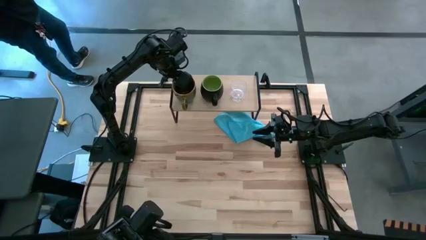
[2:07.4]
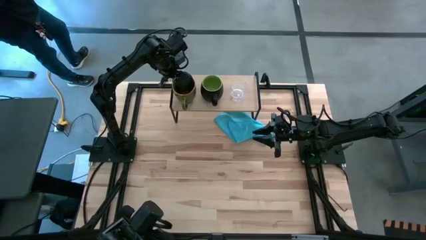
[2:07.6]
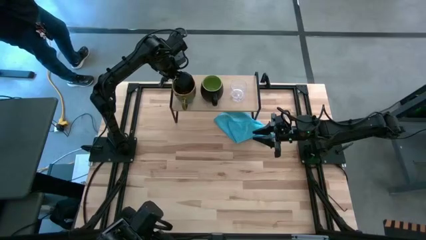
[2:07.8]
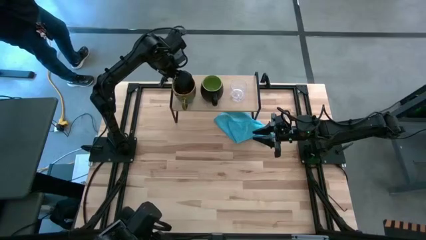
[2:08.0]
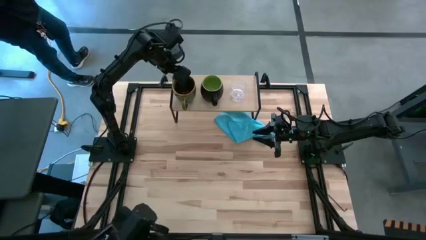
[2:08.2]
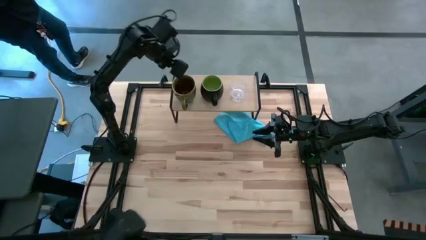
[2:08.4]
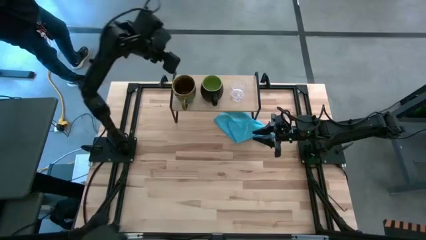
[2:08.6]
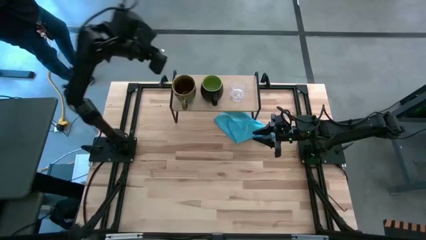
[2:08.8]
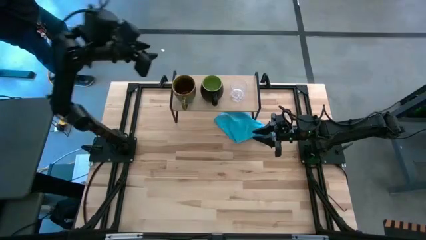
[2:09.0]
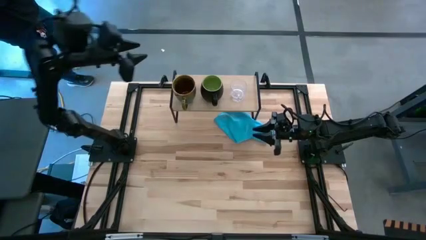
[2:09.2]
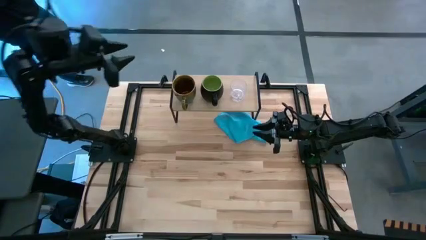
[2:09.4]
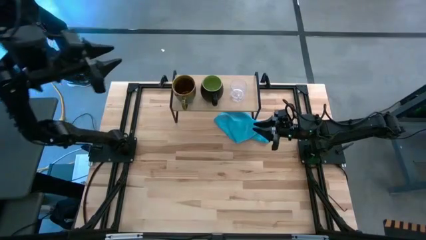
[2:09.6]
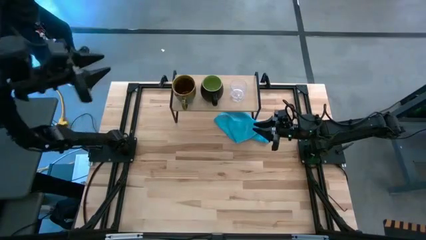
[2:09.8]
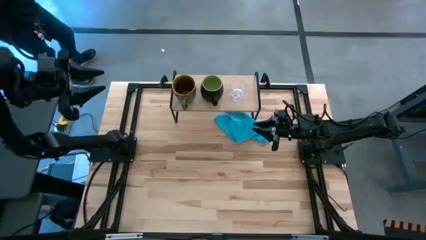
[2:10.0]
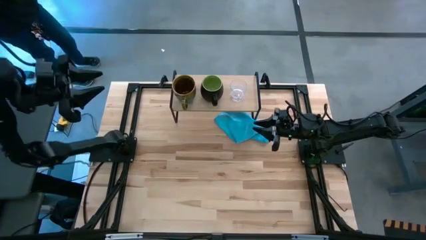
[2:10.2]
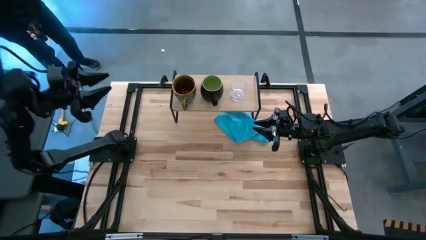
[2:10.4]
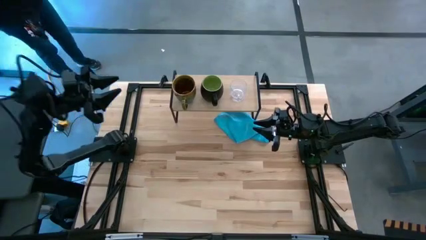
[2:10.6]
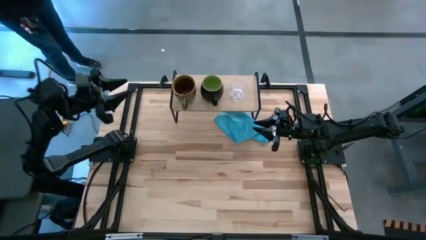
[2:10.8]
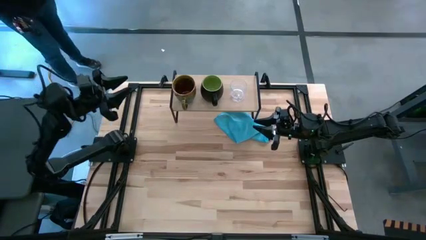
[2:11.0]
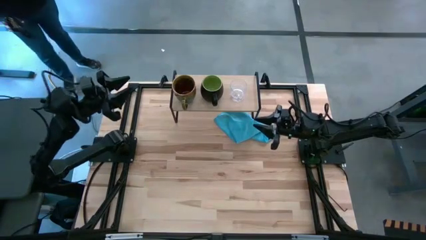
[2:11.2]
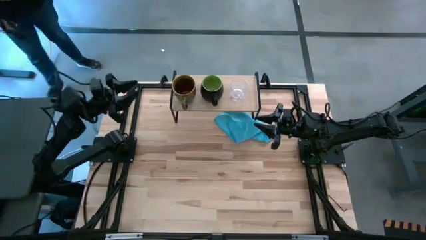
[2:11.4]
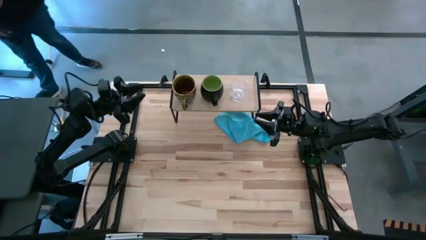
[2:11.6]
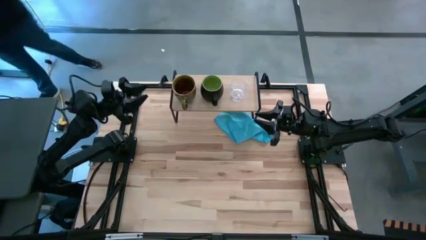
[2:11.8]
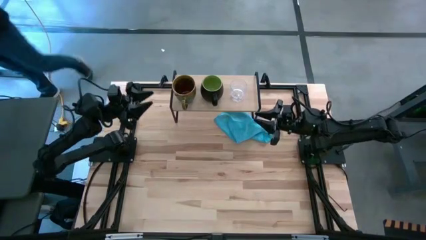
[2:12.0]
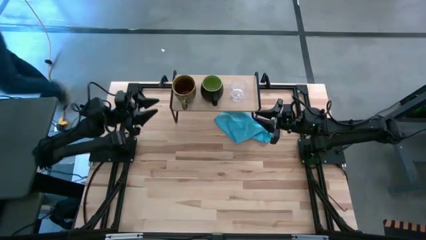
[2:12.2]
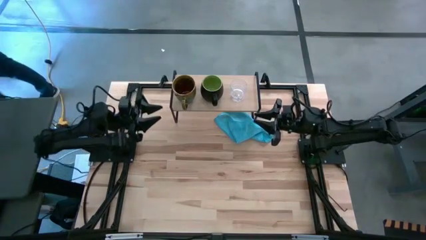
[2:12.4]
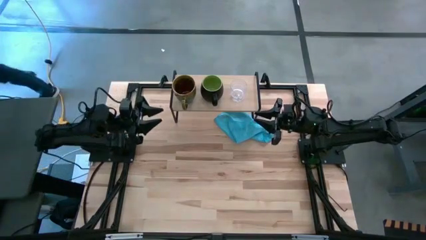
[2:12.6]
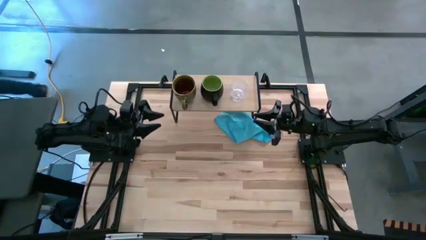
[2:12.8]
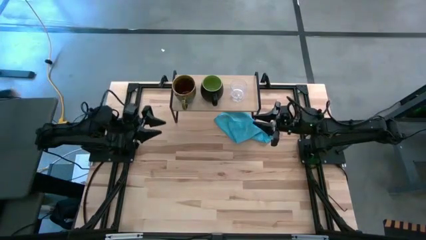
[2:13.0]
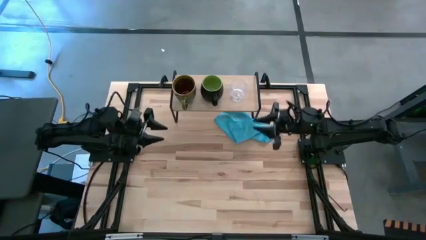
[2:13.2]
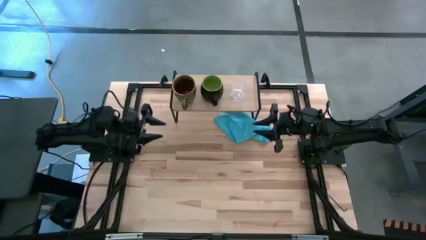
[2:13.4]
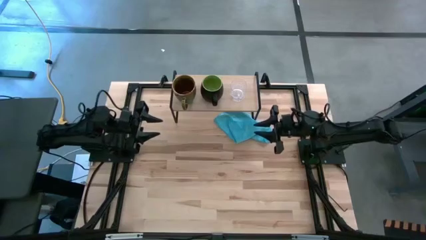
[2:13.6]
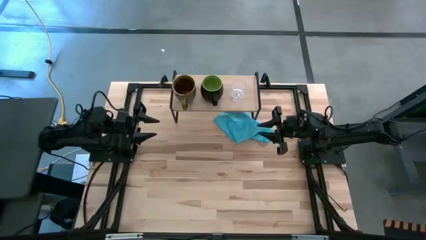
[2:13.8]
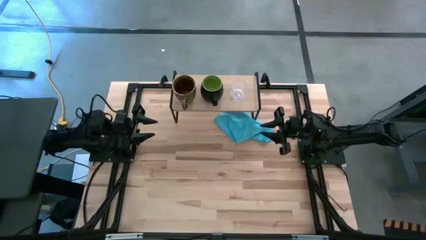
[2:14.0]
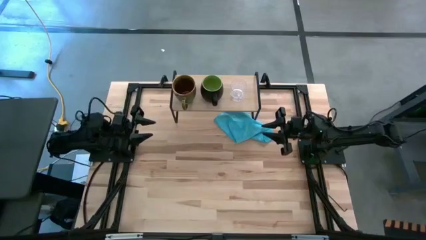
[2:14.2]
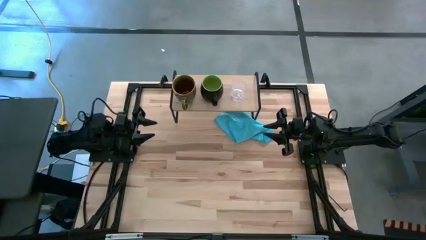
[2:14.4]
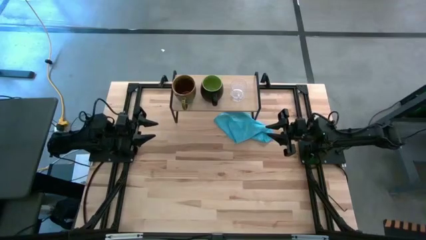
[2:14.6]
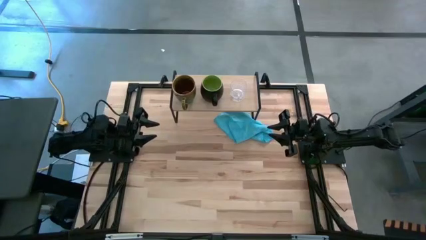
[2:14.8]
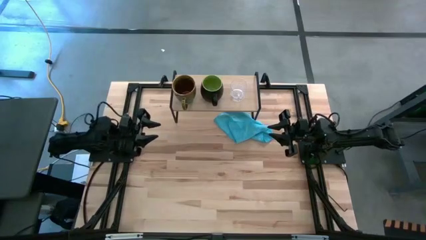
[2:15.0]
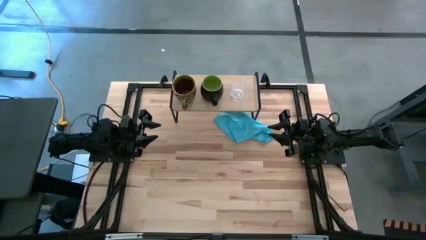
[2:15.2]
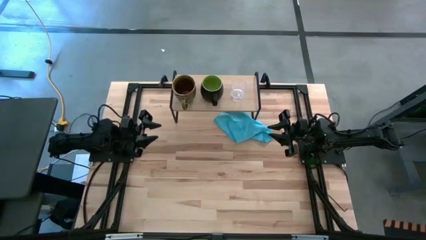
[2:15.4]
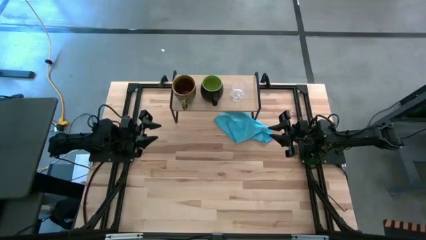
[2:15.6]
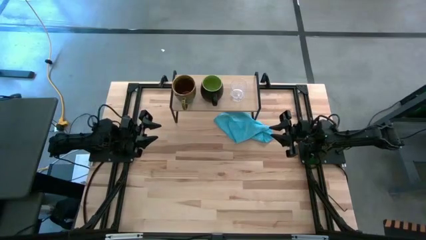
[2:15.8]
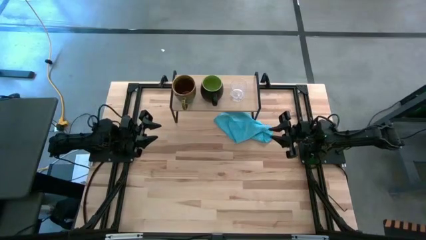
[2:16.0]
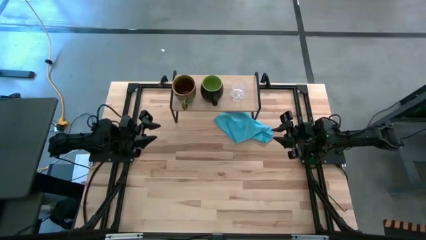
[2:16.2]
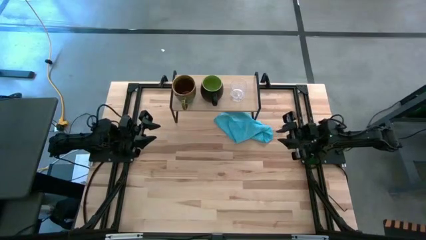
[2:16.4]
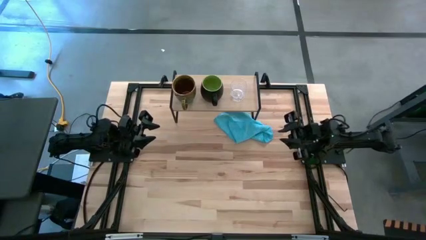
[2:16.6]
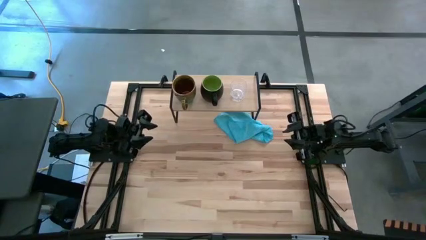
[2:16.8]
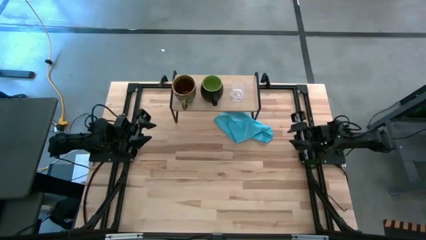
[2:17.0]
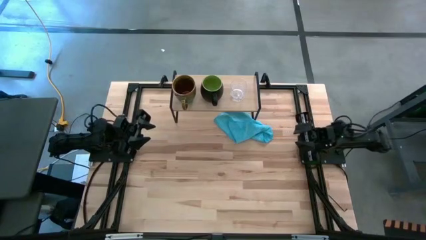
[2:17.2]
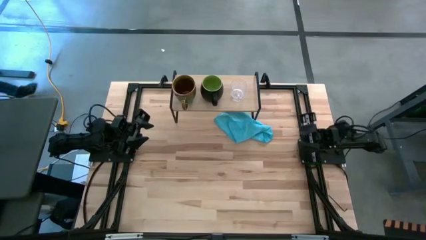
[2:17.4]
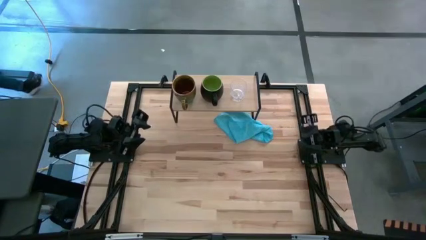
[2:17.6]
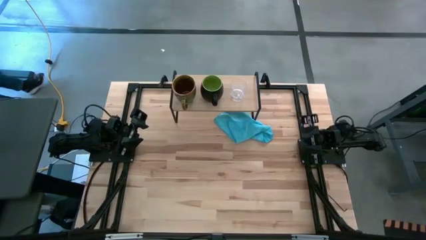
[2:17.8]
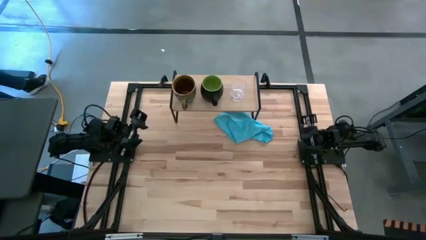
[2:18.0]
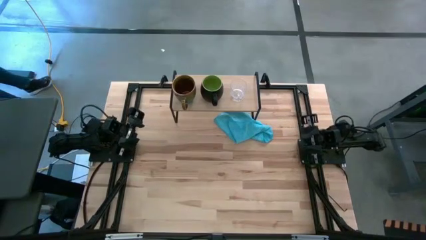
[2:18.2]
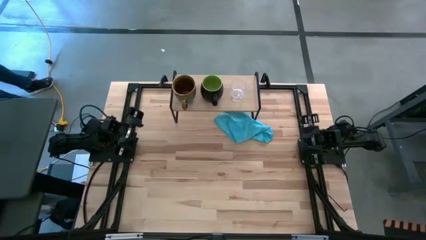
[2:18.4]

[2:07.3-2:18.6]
Task: Stack small to large cups/mugs on shelf
Return to Home Position

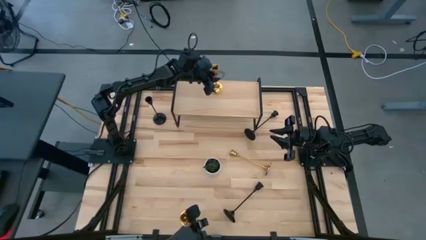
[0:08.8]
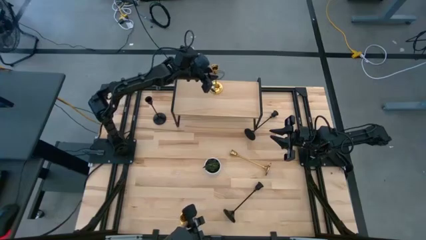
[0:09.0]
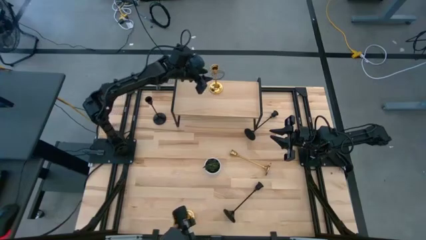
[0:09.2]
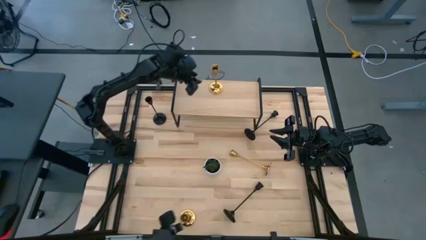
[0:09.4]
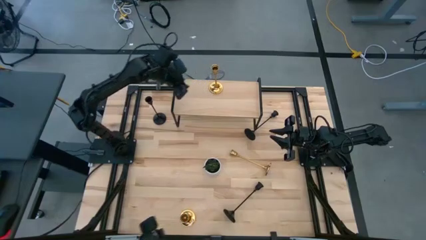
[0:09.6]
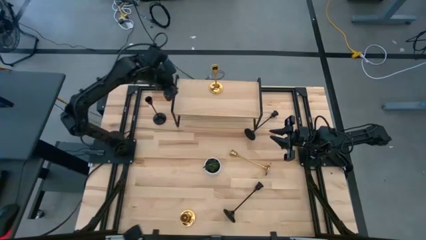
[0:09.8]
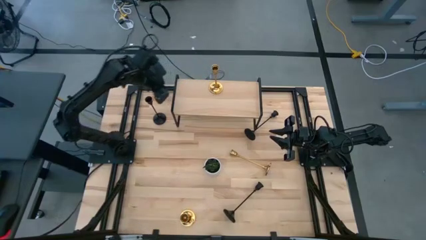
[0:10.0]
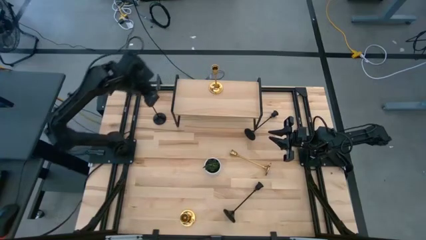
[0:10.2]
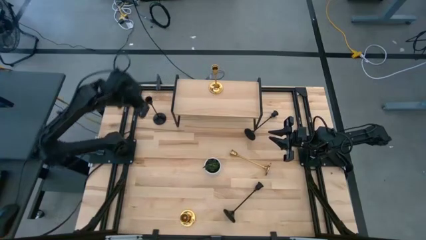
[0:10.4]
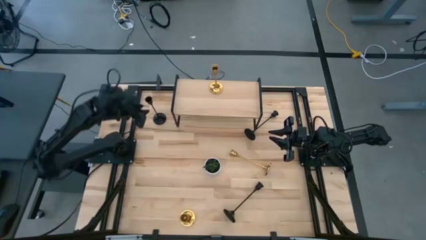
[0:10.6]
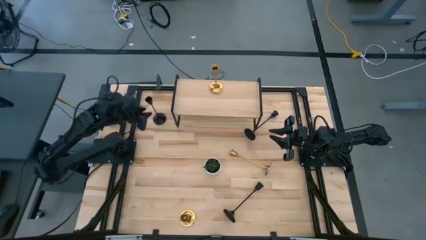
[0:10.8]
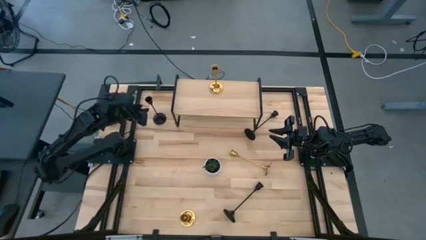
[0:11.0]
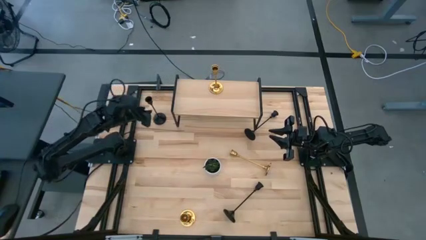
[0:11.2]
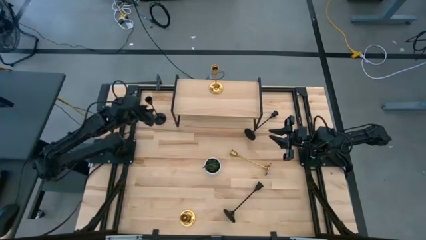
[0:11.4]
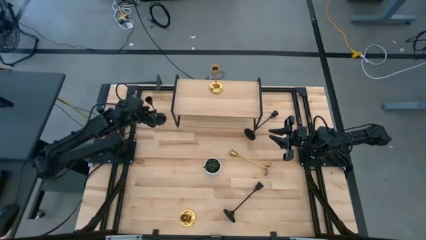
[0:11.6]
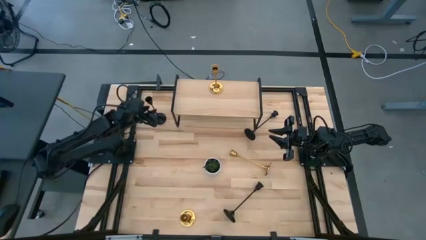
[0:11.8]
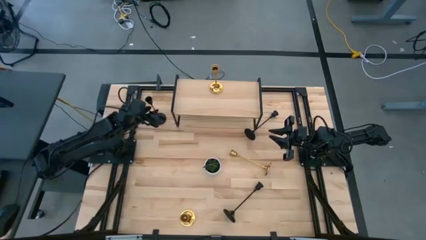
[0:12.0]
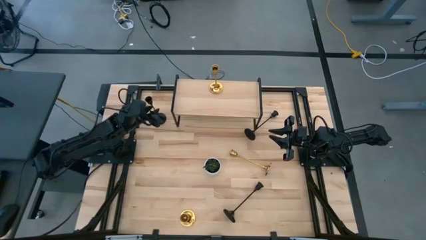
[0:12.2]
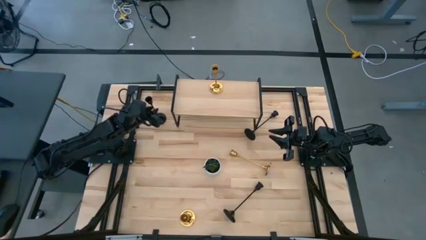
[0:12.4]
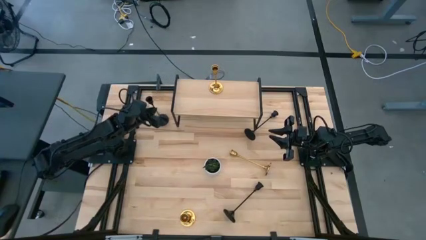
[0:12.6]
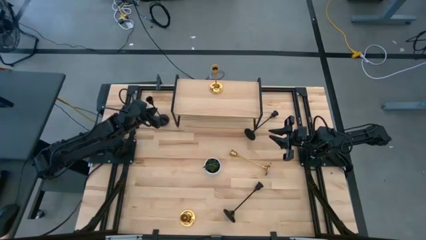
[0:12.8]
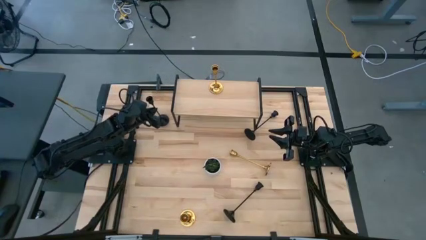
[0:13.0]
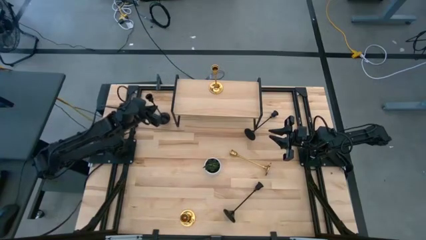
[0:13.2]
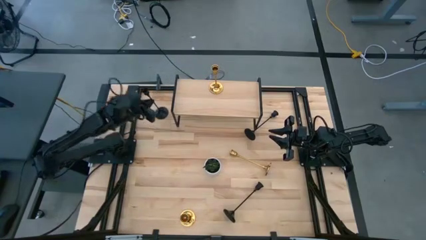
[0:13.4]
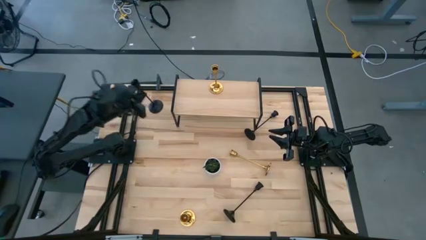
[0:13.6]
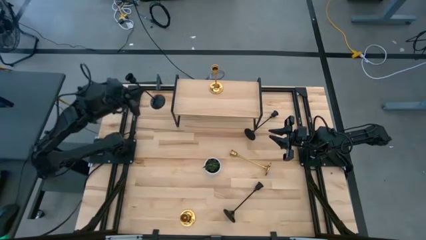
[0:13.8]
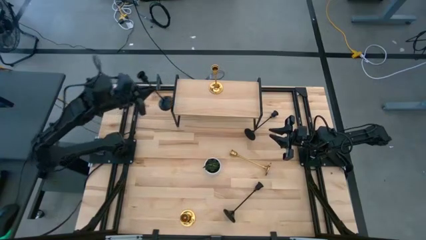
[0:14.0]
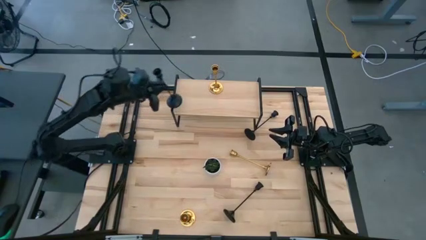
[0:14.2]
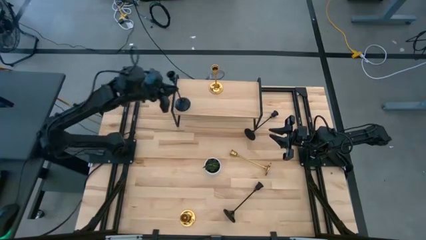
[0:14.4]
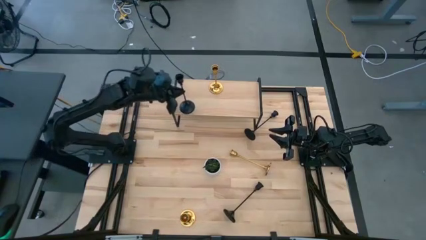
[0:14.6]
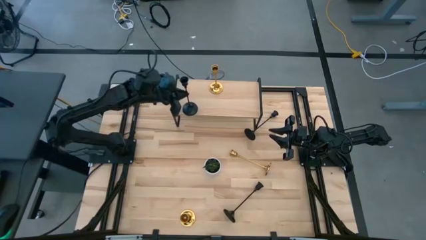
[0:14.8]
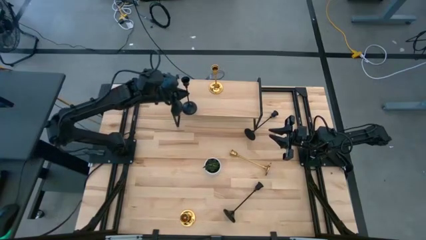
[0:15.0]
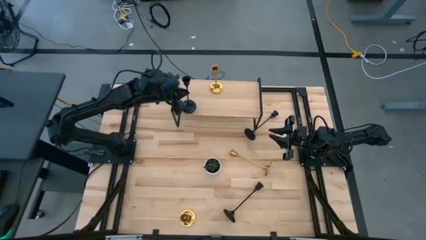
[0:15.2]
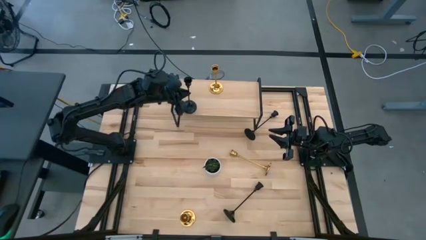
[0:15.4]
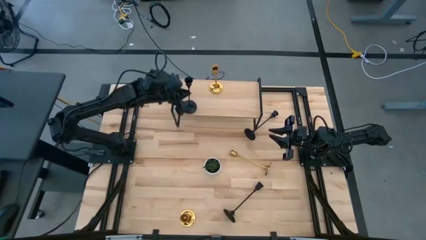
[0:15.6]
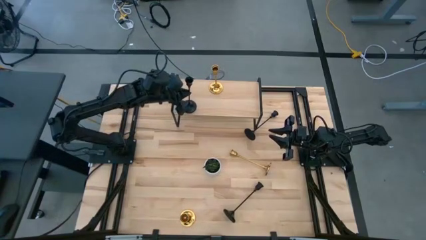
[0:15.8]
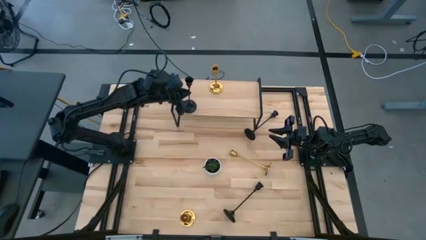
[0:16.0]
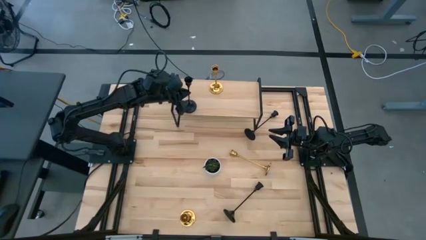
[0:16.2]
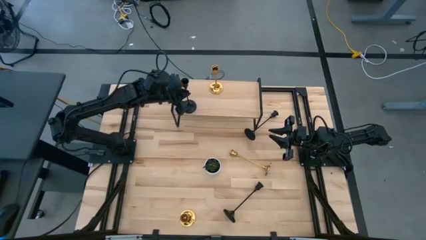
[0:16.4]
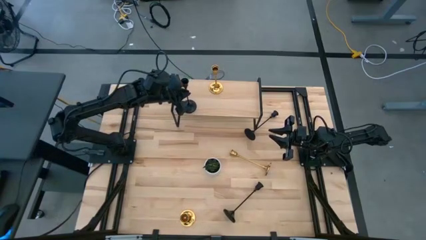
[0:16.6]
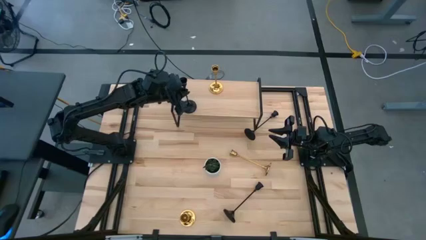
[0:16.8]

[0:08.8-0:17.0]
Task: Pick & Place candle stick holders
Put the top left black candle holder on the shelf
